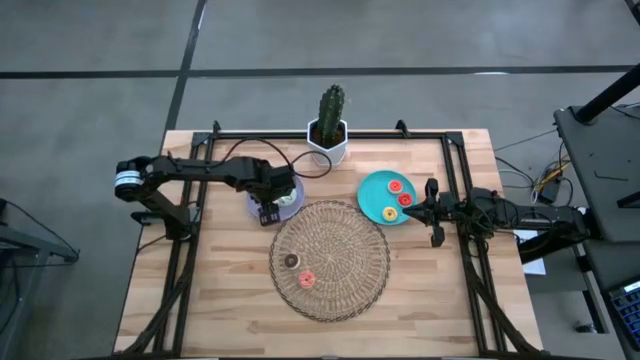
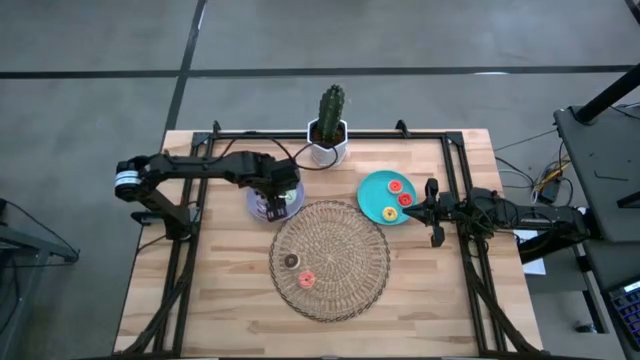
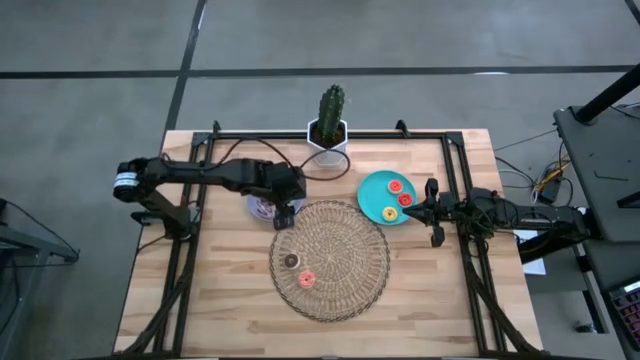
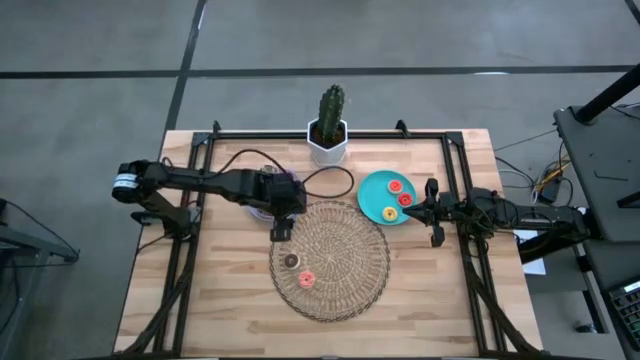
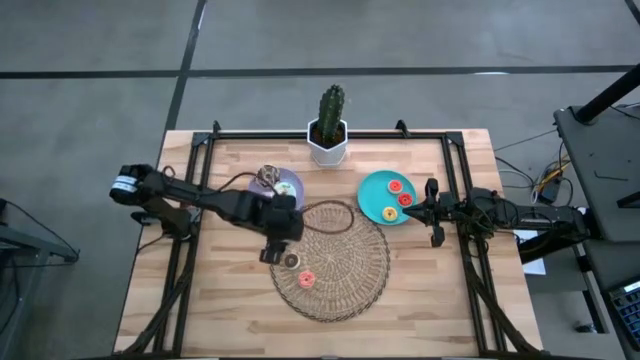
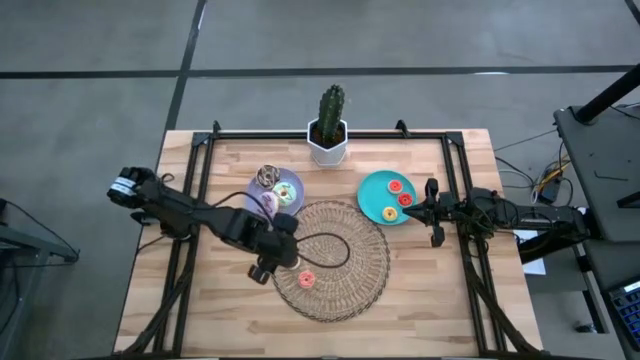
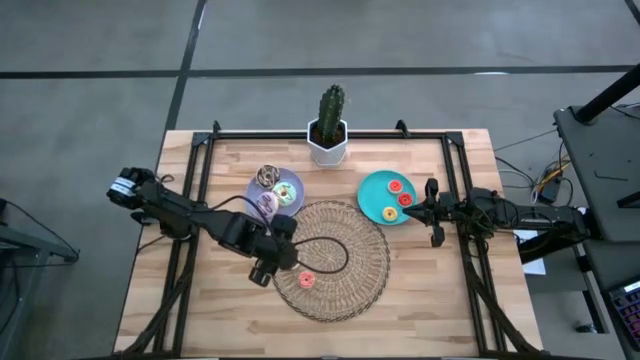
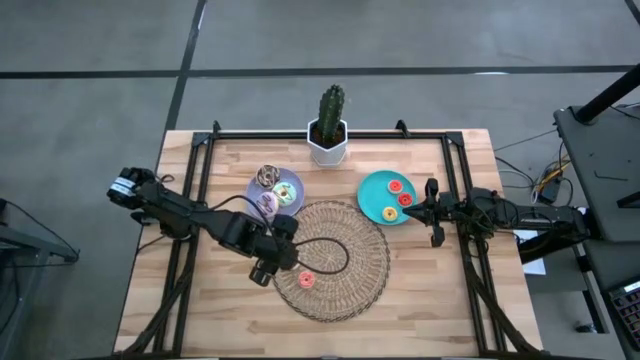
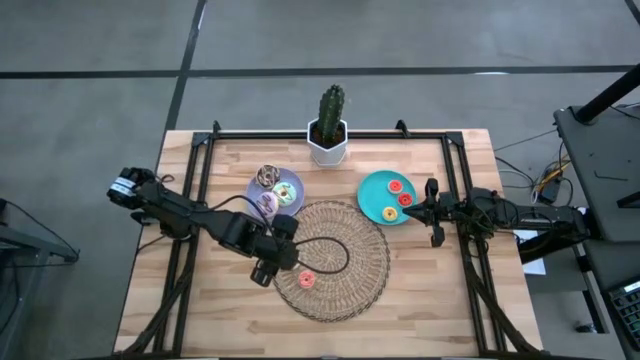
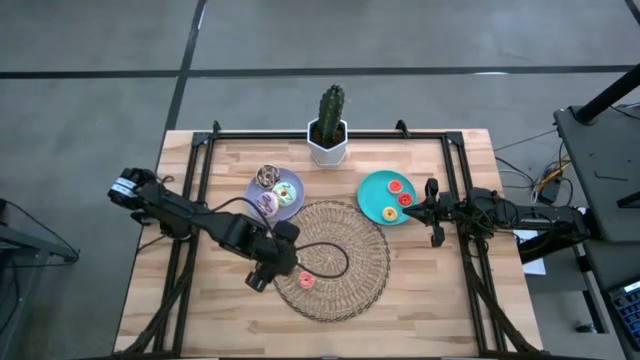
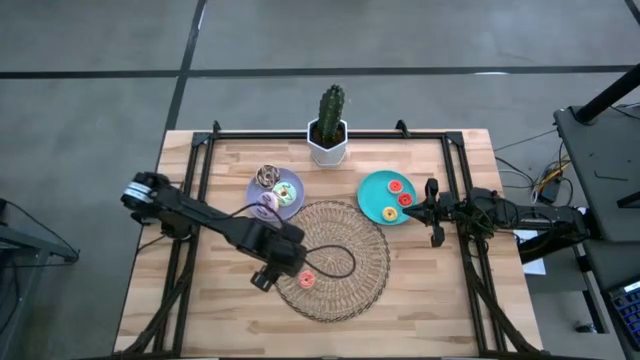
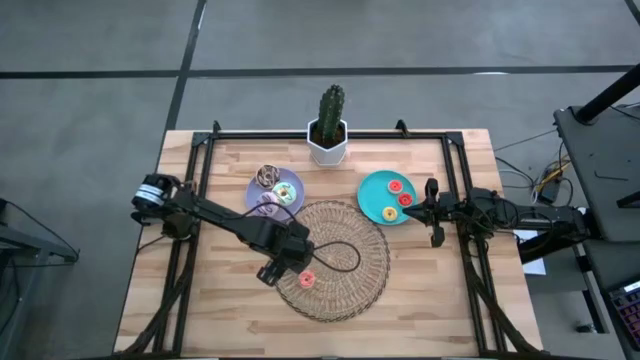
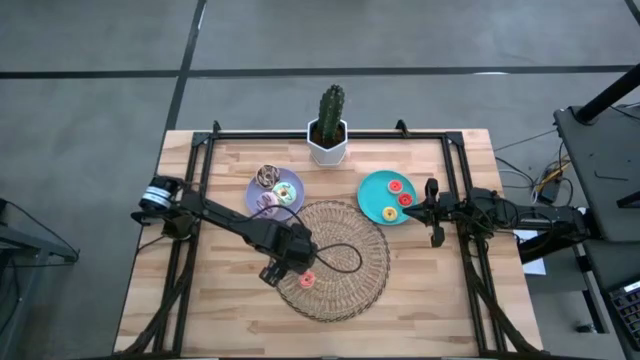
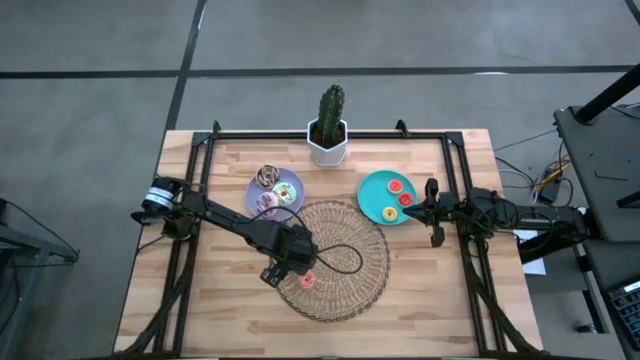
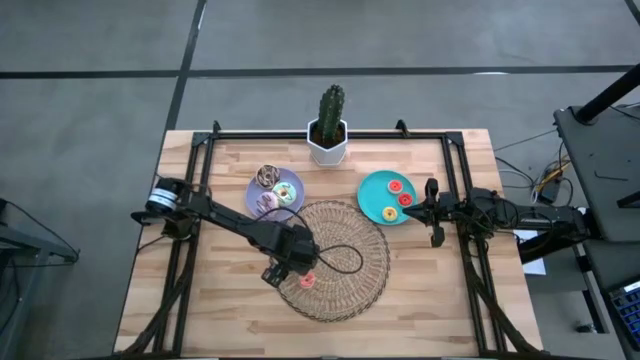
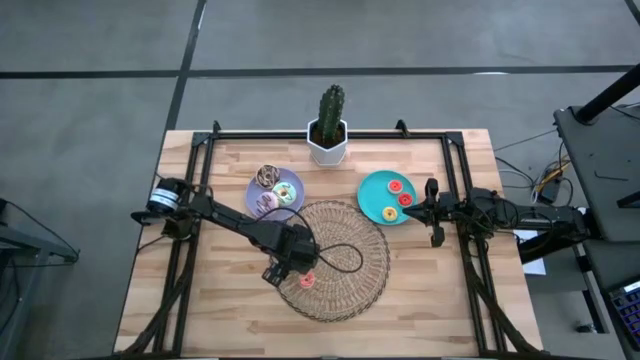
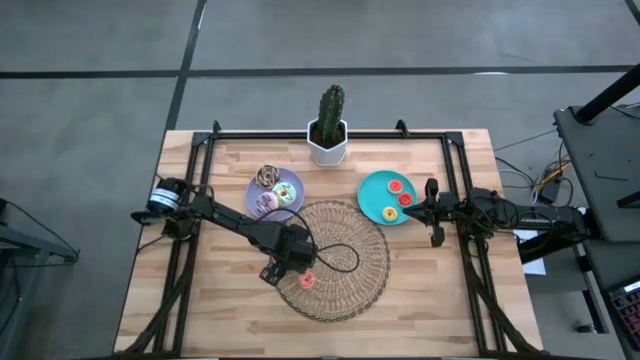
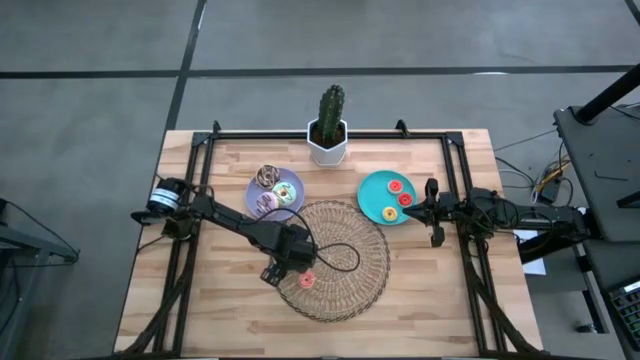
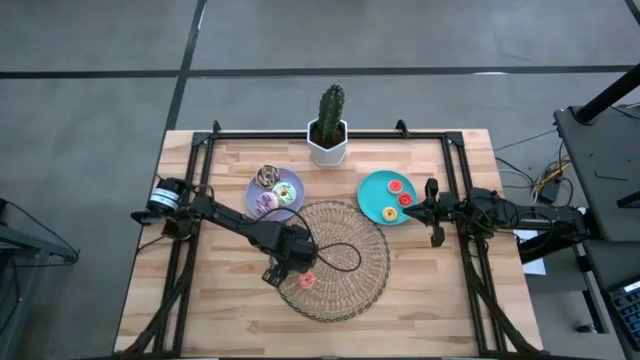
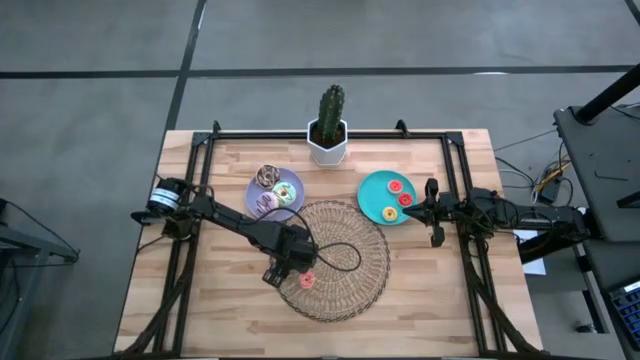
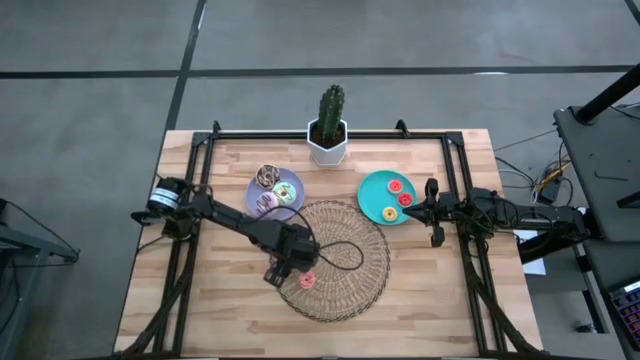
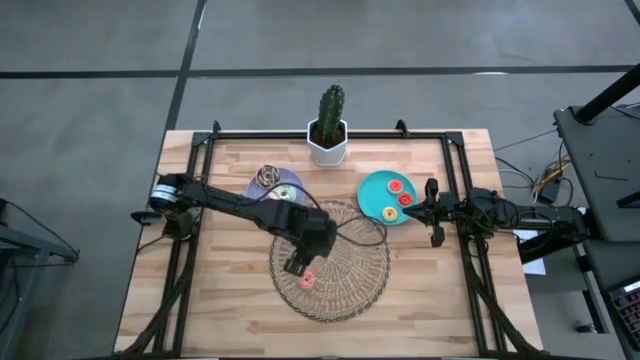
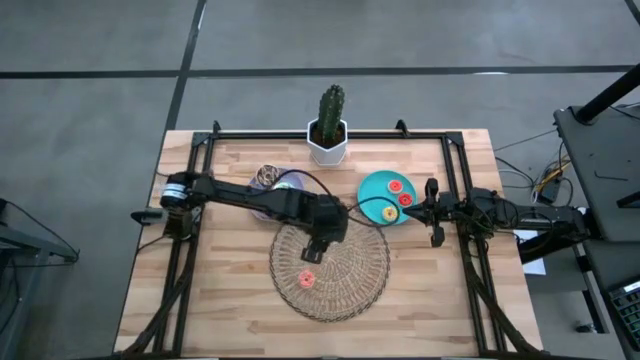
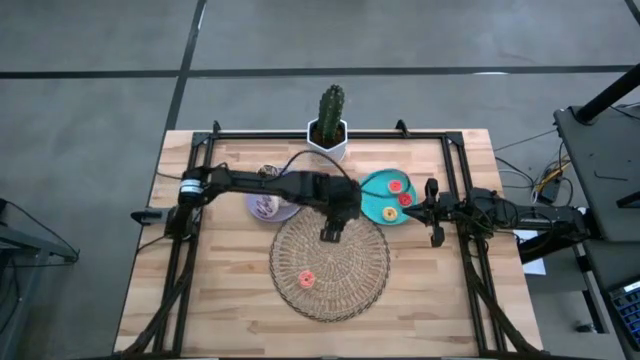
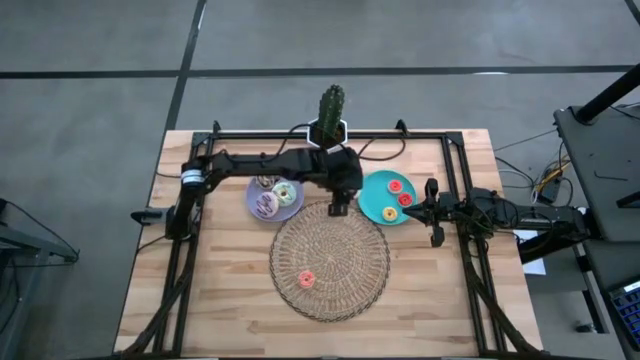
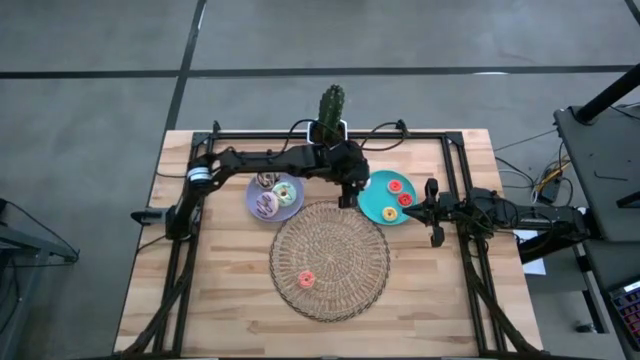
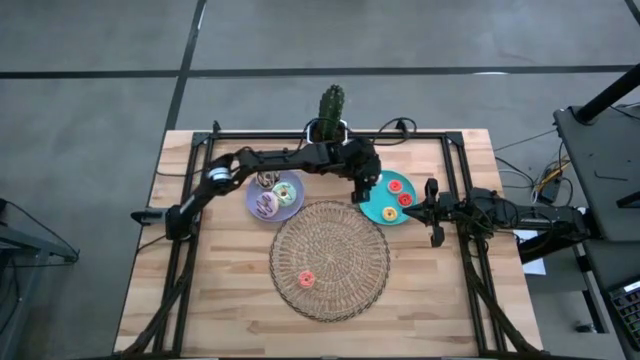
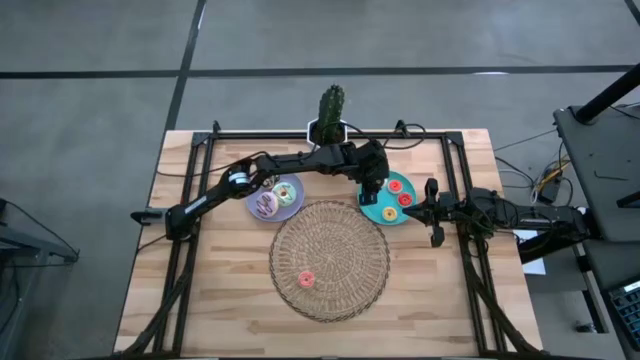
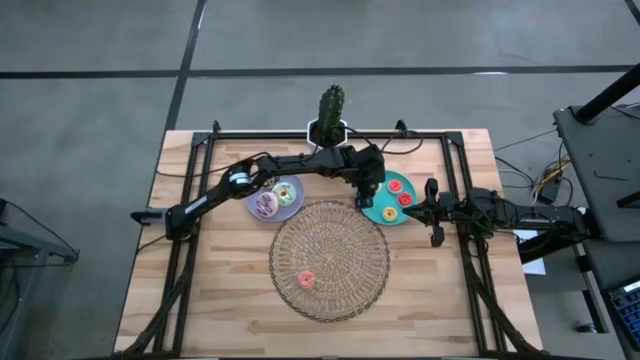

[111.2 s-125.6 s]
Task: Pick & Place donuts
Put the small brown donut on the blue plate
